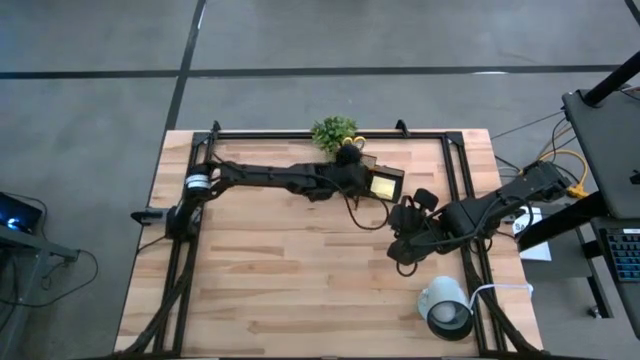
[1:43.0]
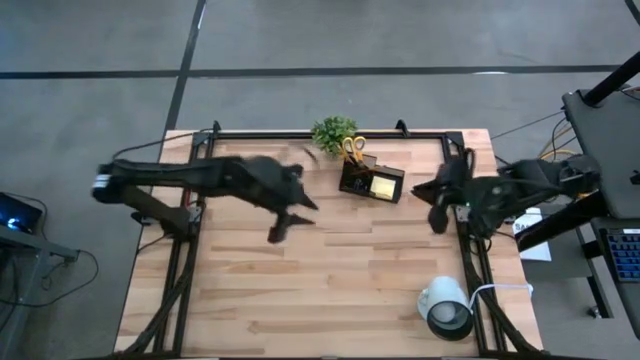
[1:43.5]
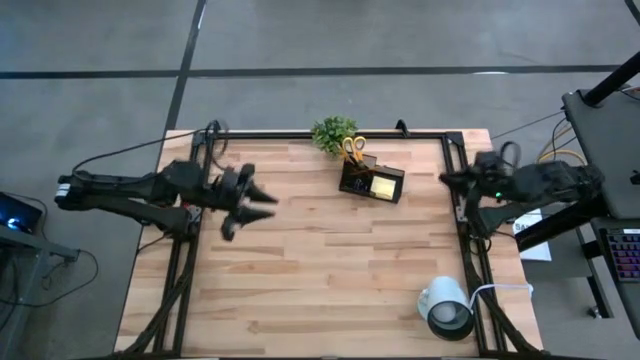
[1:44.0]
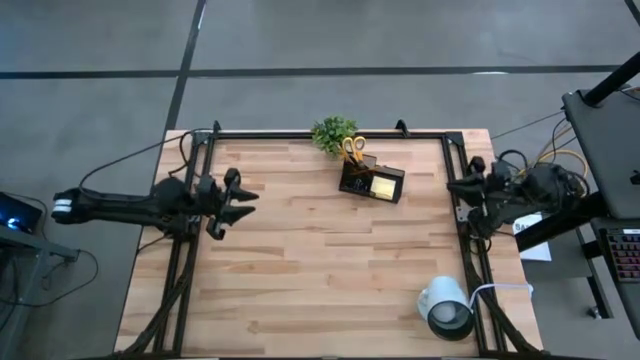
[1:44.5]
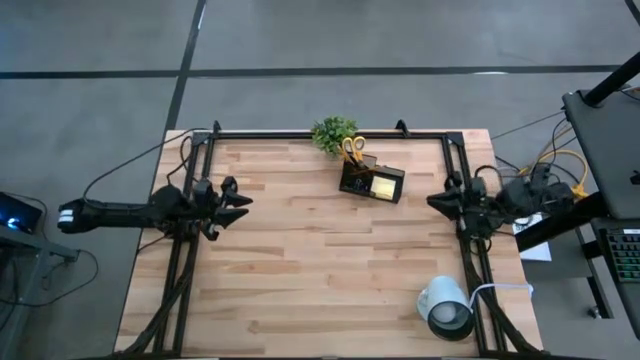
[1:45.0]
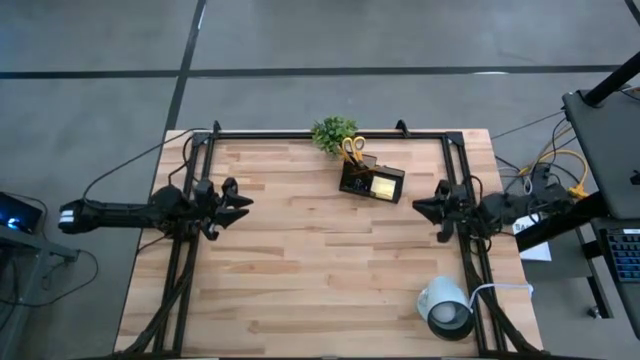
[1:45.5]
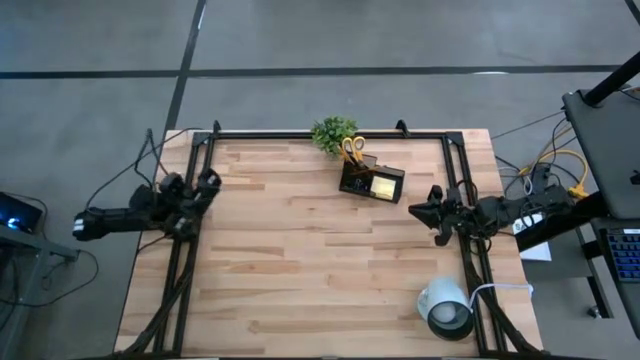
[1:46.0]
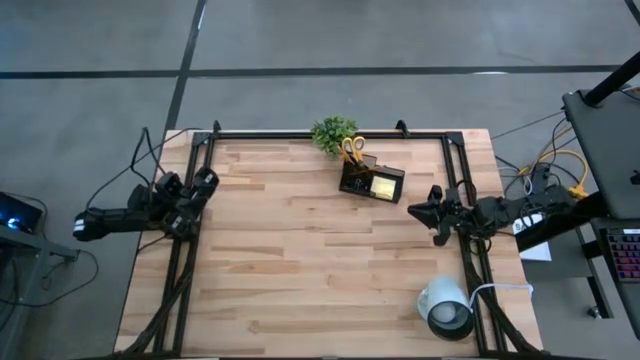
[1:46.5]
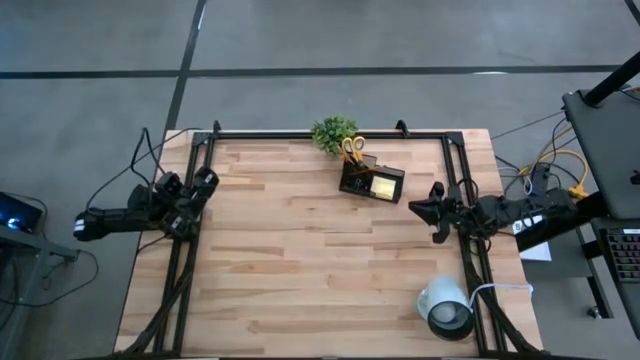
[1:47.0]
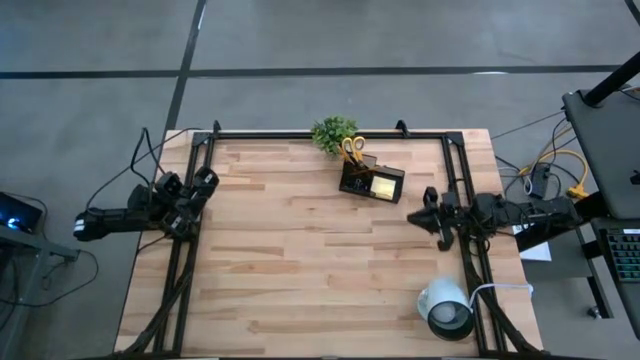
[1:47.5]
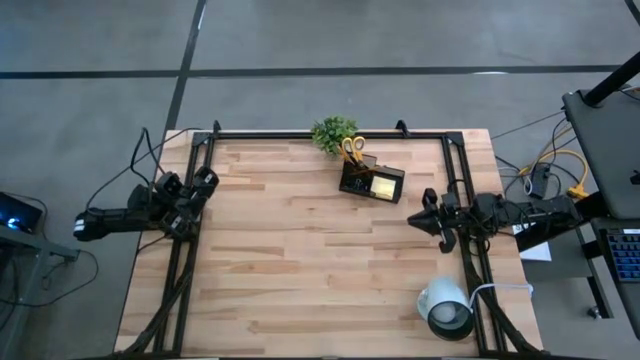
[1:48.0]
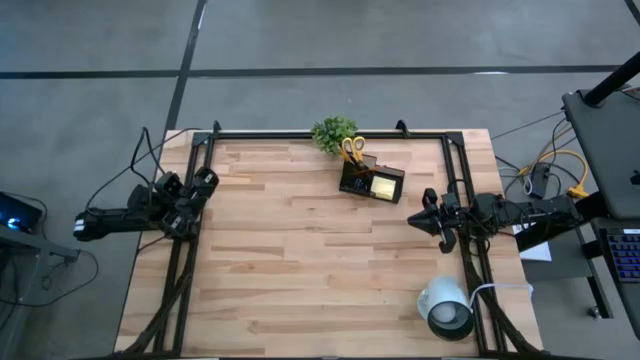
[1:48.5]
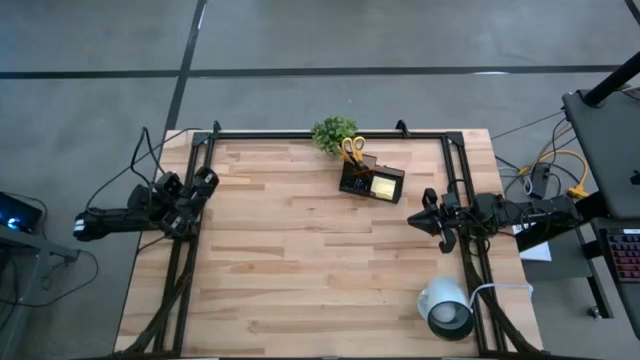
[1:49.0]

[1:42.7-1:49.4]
Task: Pick and place office supplies into organizer
Return to Home Position

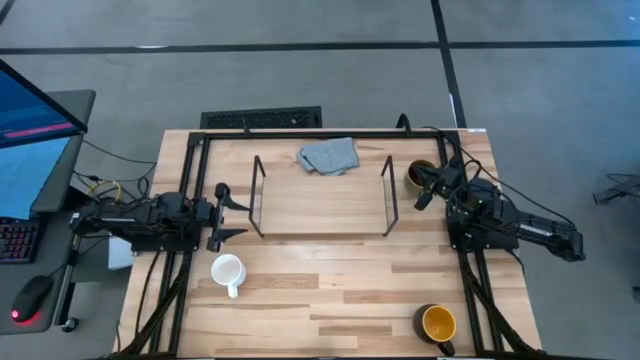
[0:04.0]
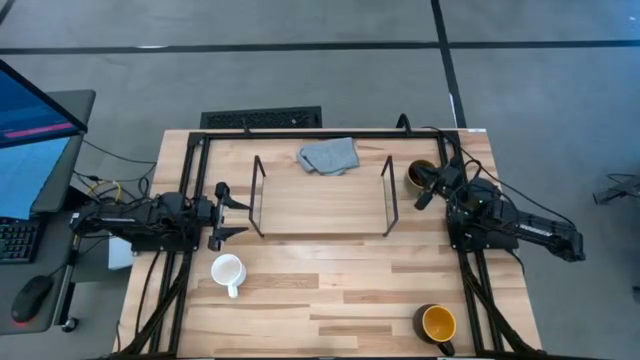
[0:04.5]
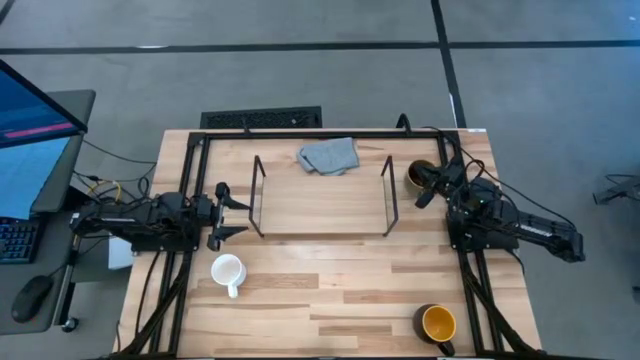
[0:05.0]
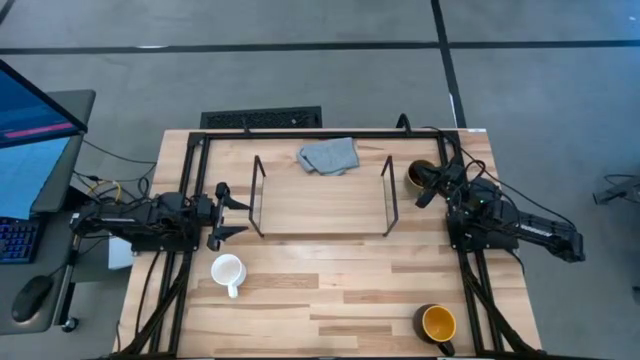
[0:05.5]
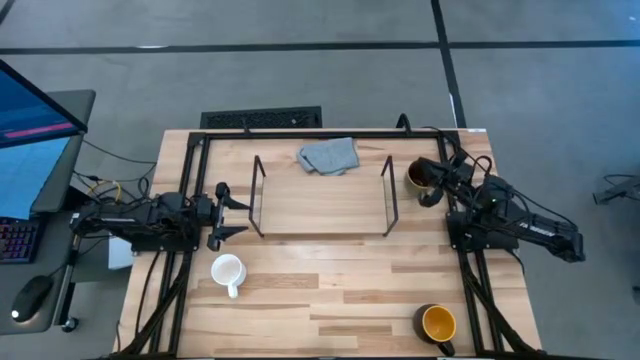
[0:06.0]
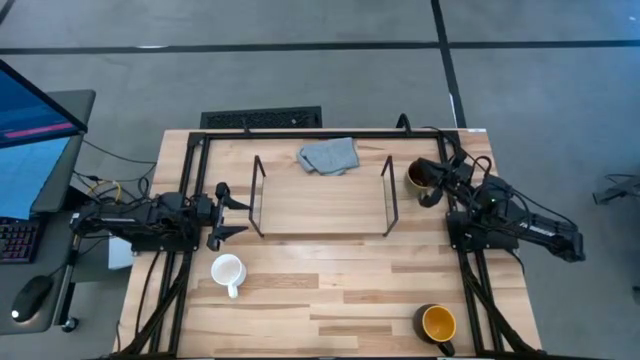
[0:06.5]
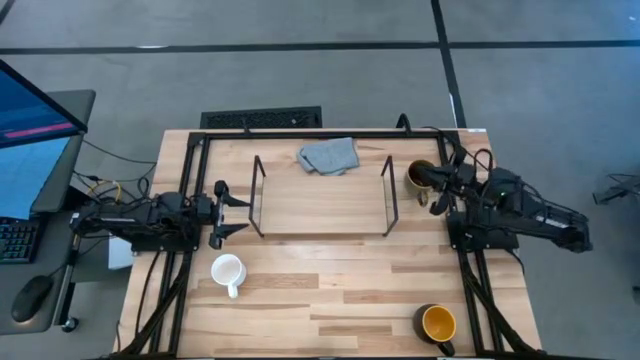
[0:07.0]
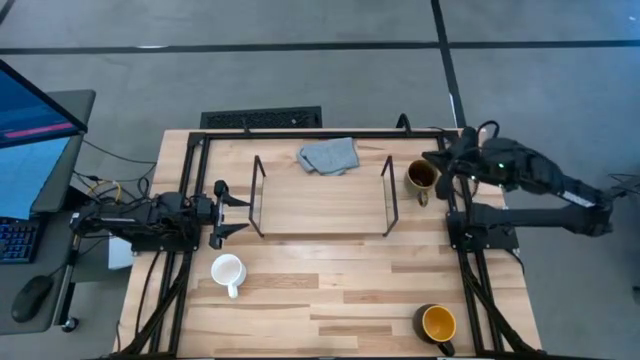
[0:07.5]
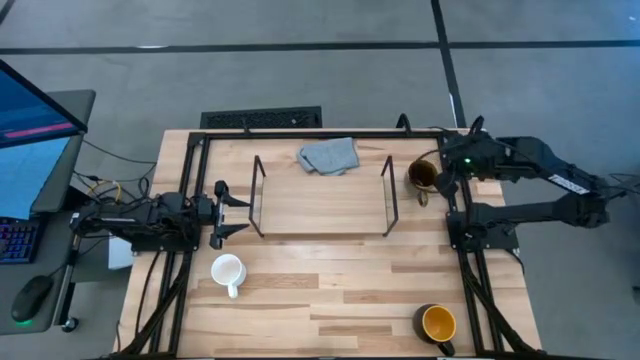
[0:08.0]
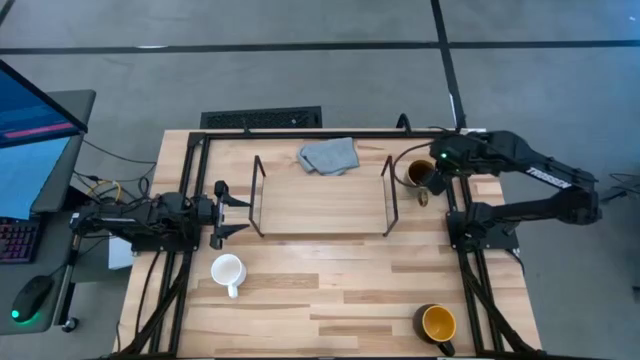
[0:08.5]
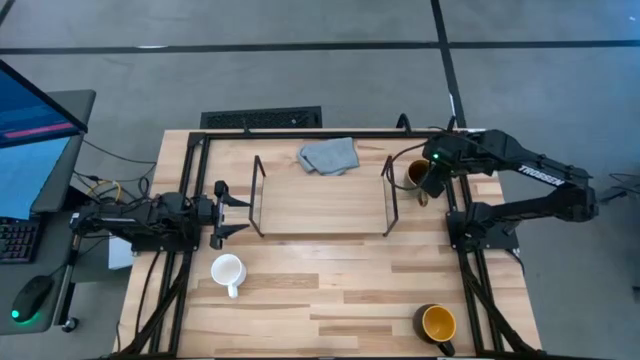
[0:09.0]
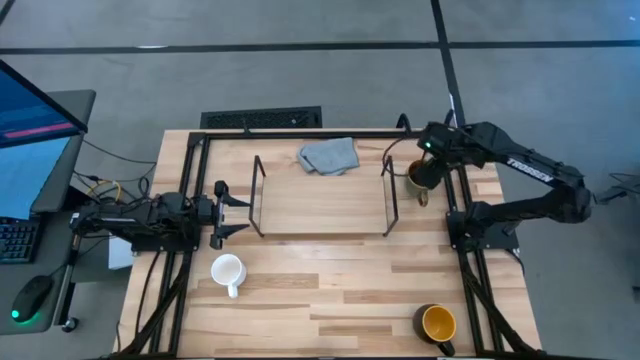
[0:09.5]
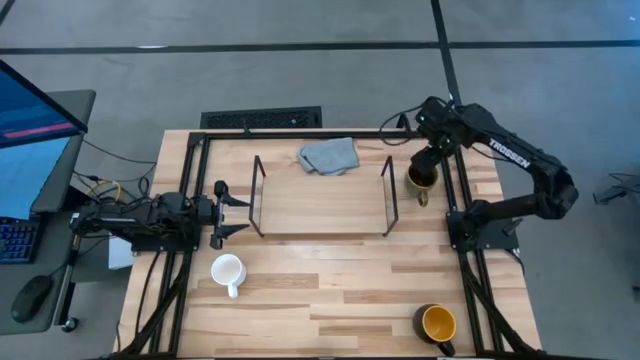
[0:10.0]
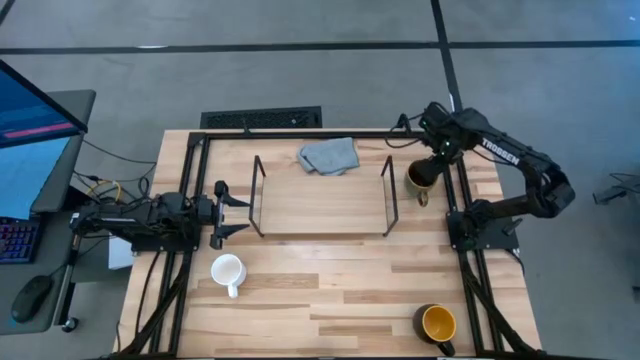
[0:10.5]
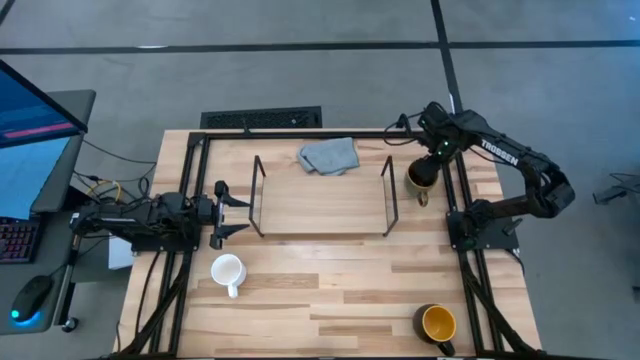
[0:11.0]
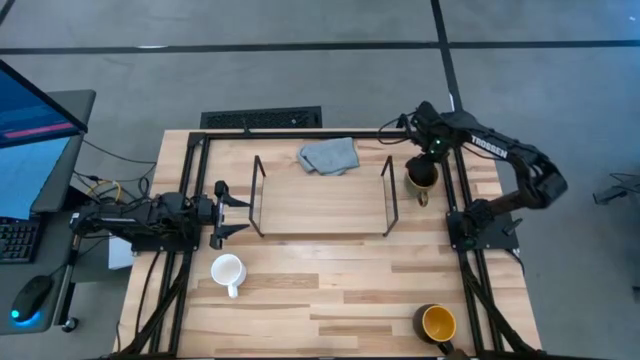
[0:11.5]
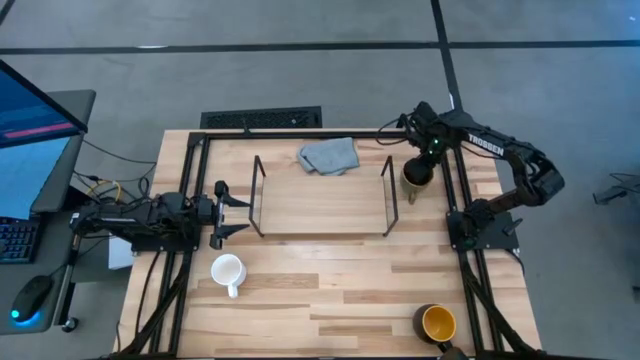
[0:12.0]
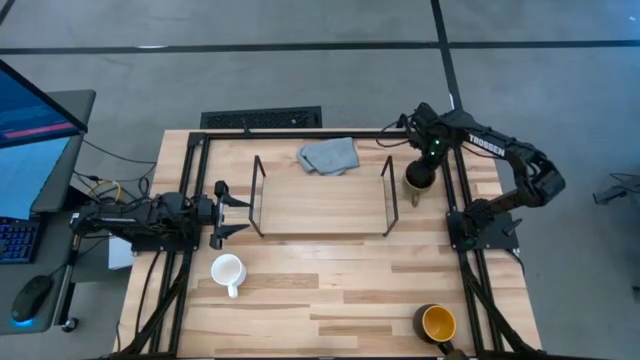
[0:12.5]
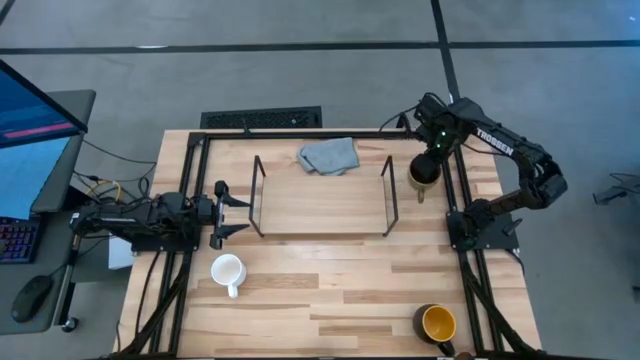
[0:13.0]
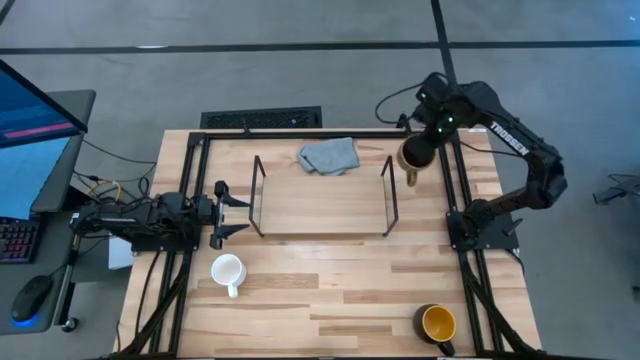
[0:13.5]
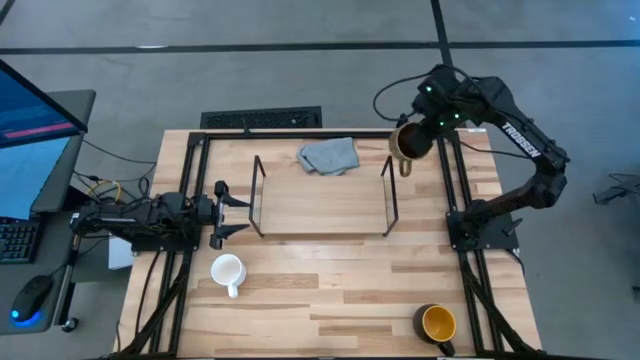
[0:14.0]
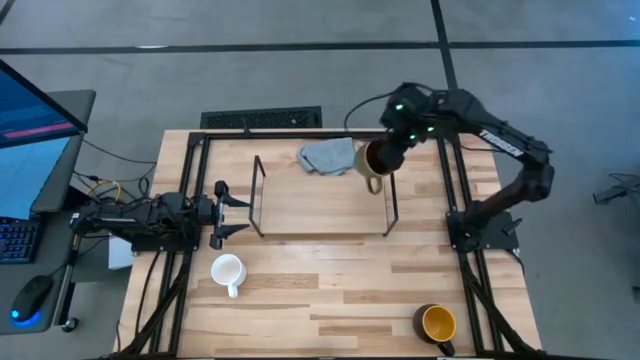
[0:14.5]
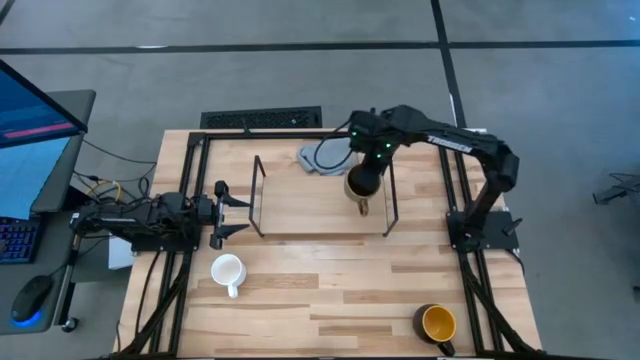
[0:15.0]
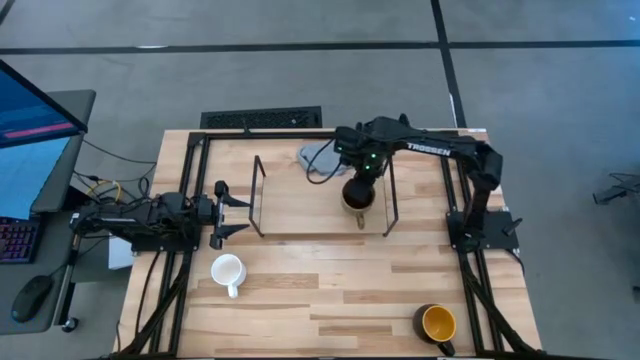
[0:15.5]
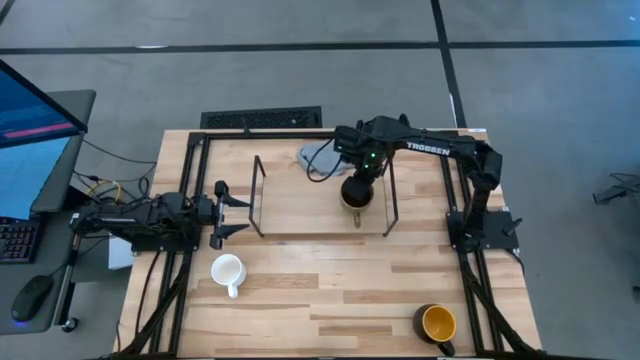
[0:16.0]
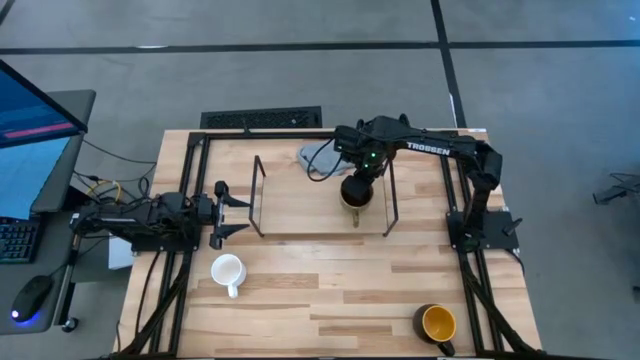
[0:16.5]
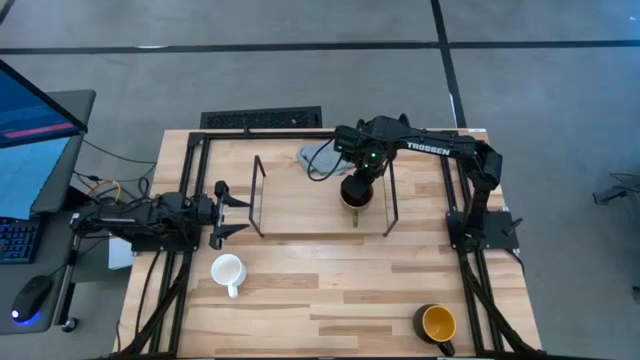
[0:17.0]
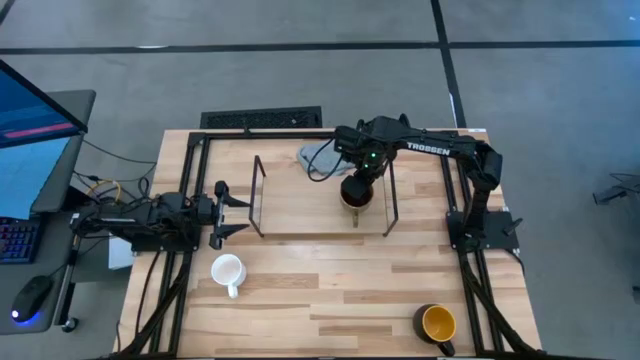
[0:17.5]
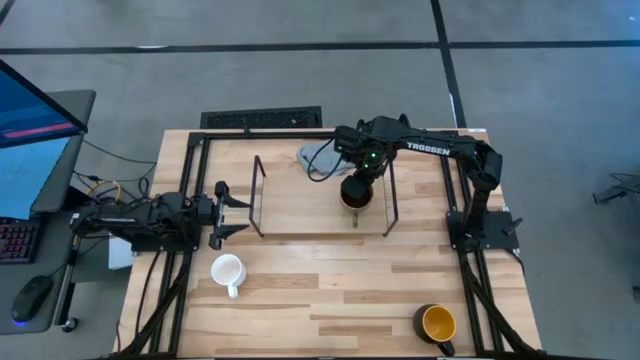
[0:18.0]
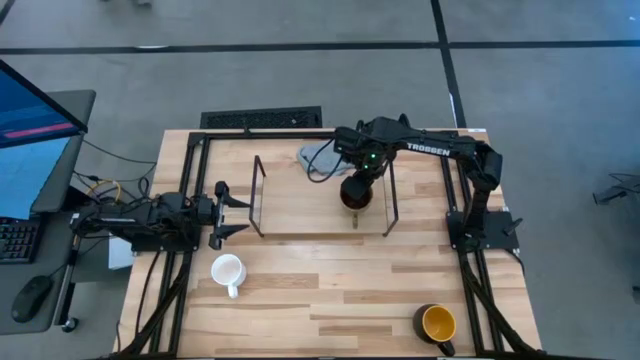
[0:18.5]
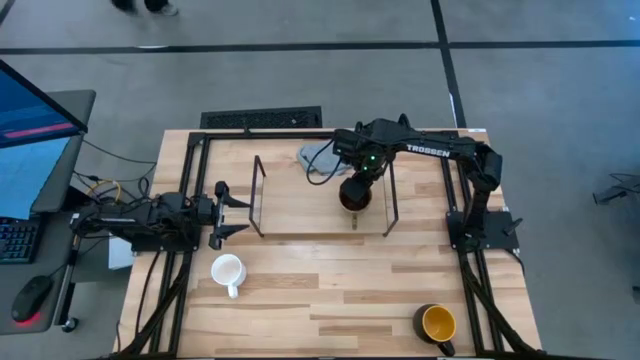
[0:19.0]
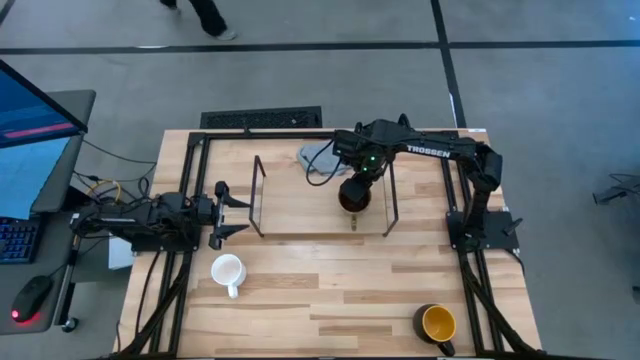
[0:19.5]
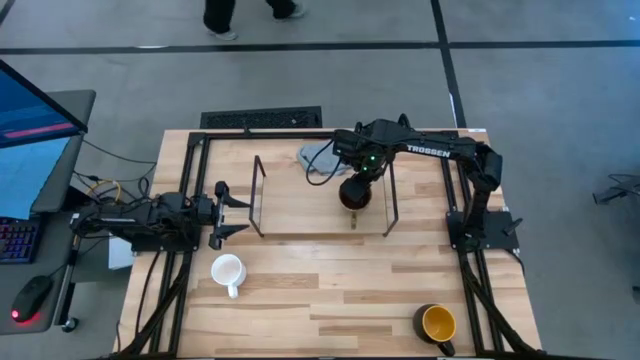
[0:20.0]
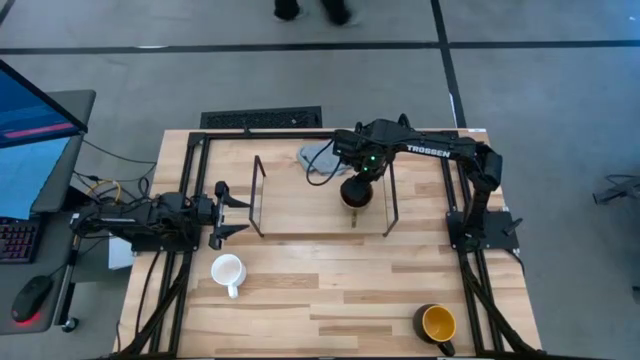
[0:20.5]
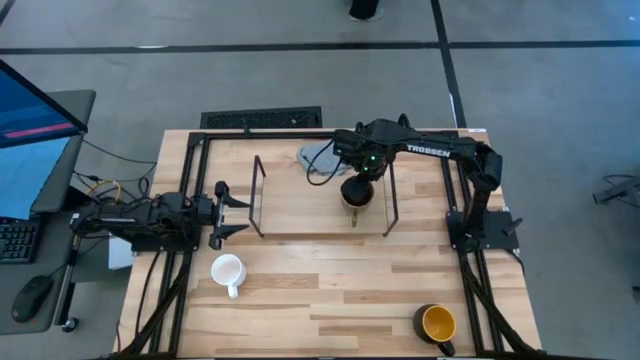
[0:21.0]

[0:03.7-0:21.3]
Task: Stack small to large cups/mugs on shelf
Put the brown mug on the shelf
